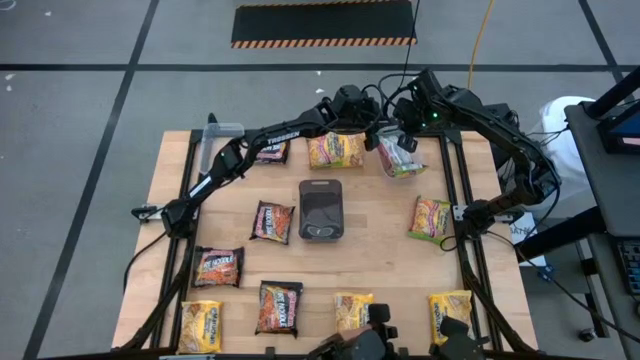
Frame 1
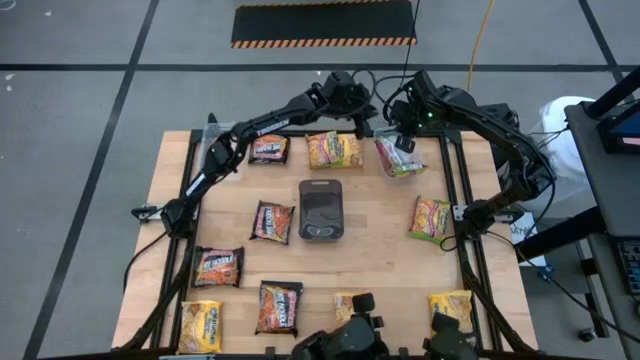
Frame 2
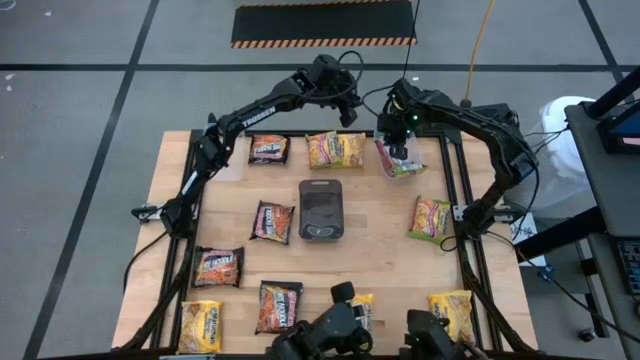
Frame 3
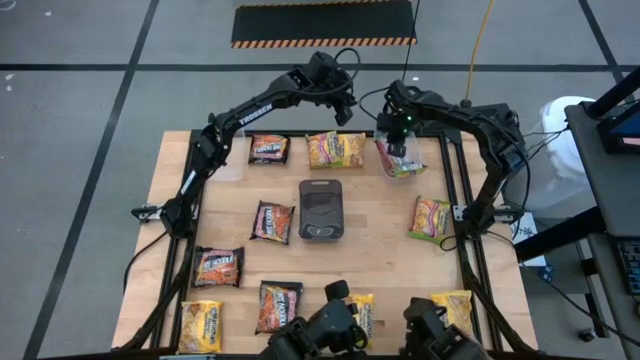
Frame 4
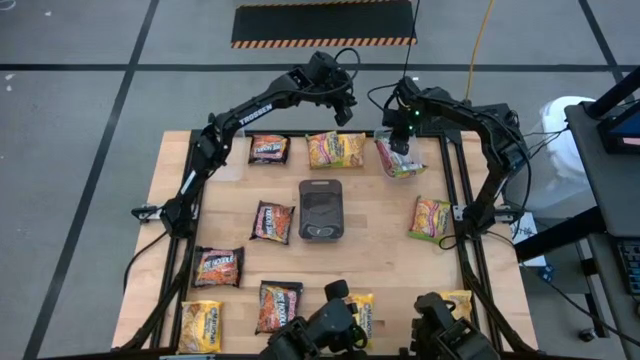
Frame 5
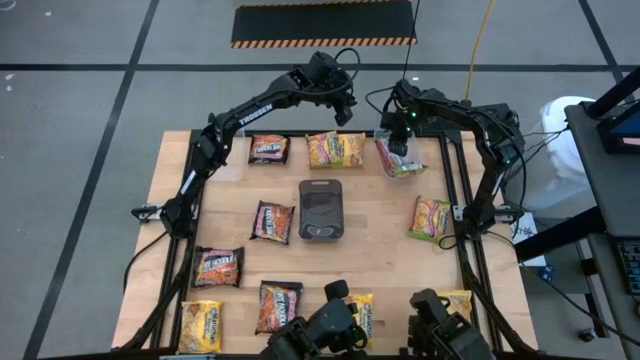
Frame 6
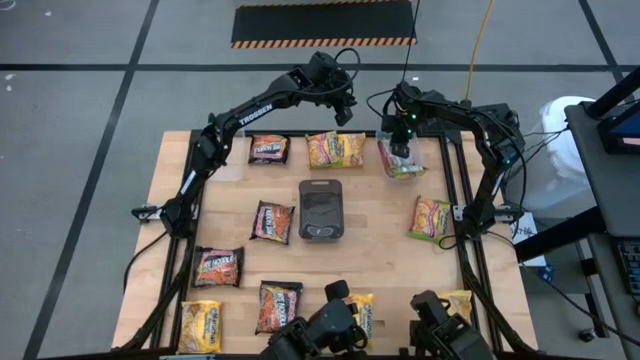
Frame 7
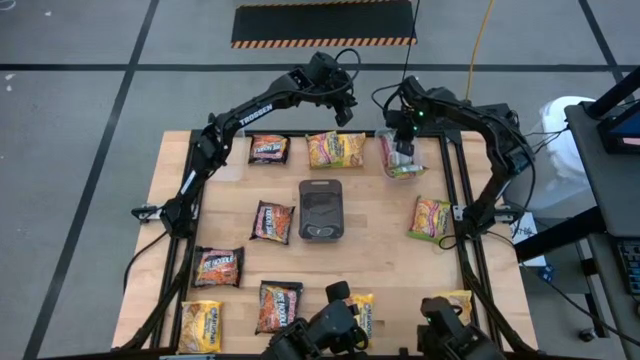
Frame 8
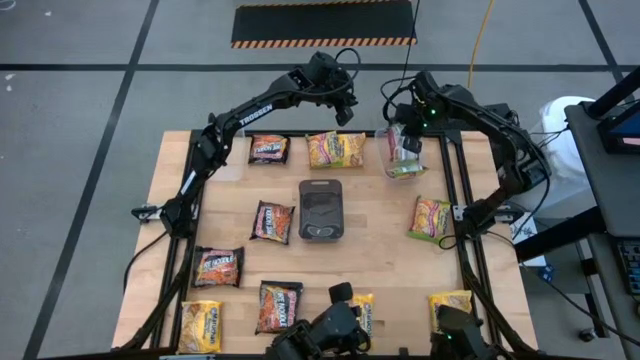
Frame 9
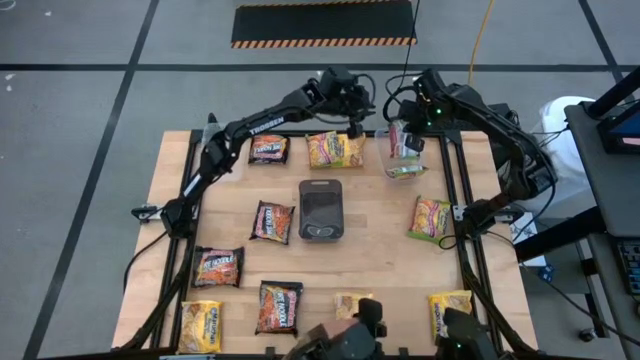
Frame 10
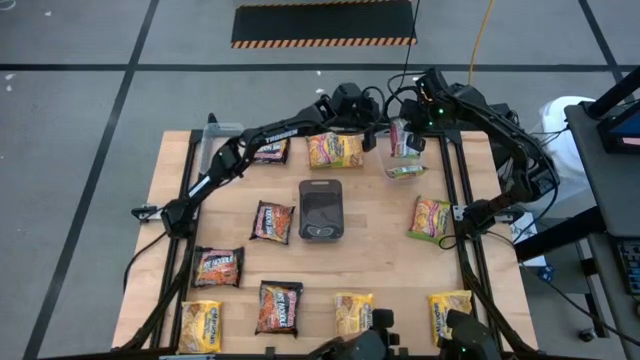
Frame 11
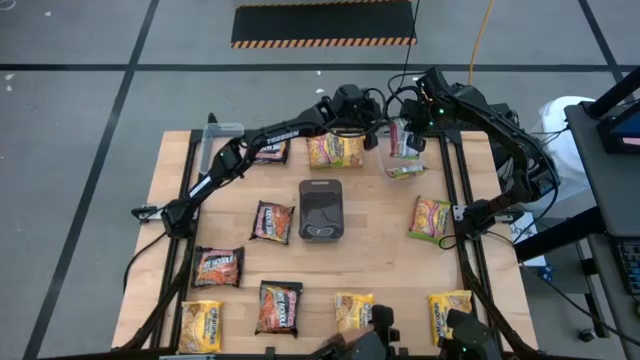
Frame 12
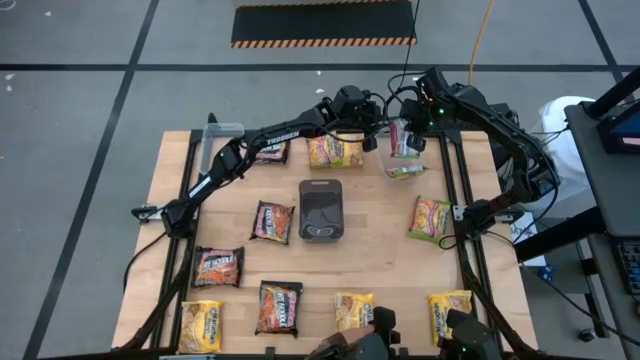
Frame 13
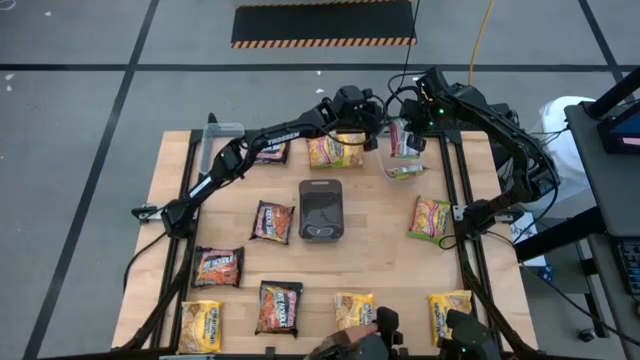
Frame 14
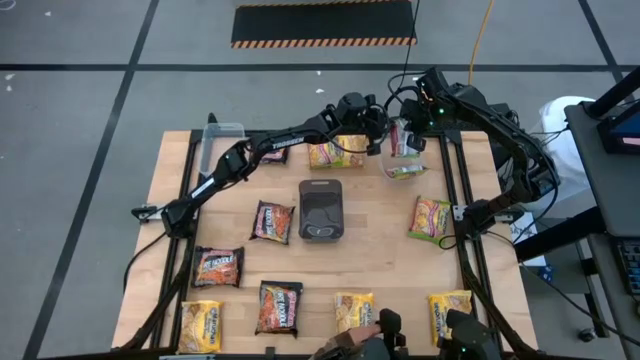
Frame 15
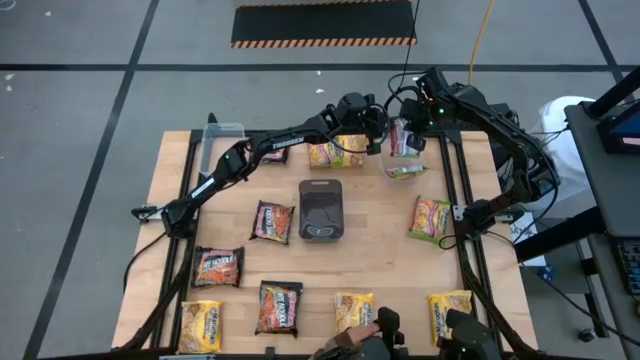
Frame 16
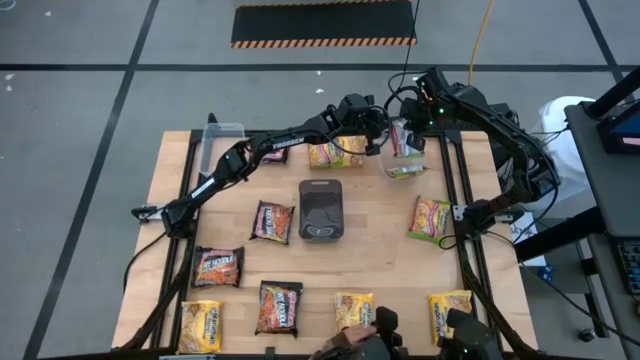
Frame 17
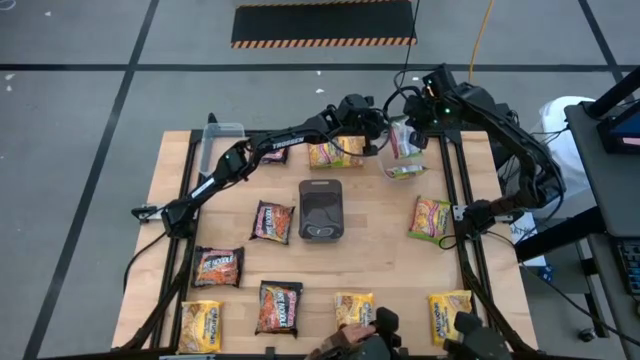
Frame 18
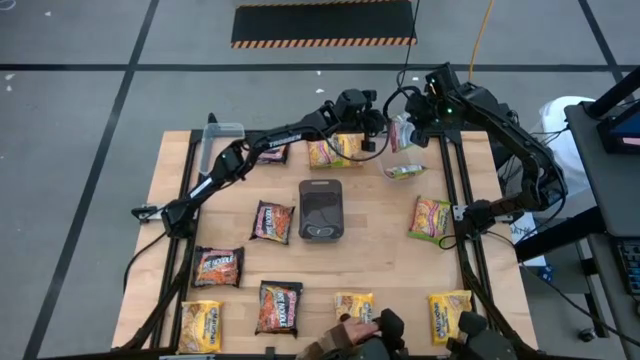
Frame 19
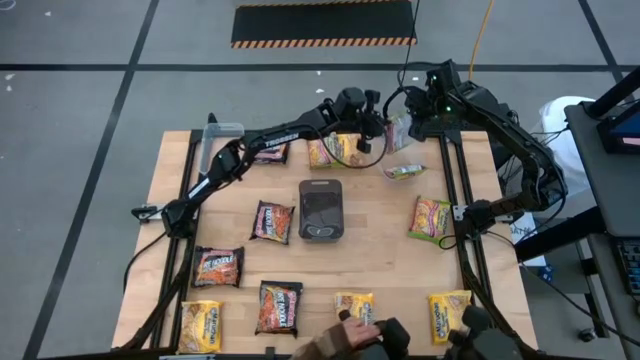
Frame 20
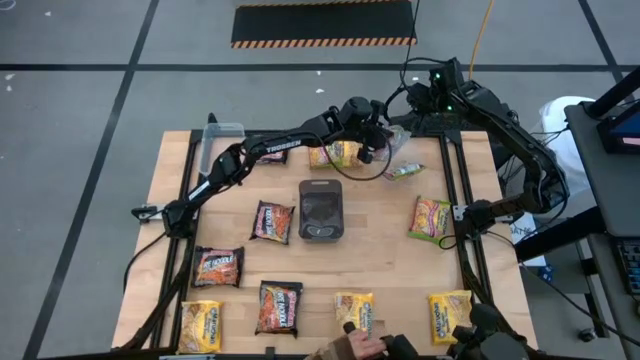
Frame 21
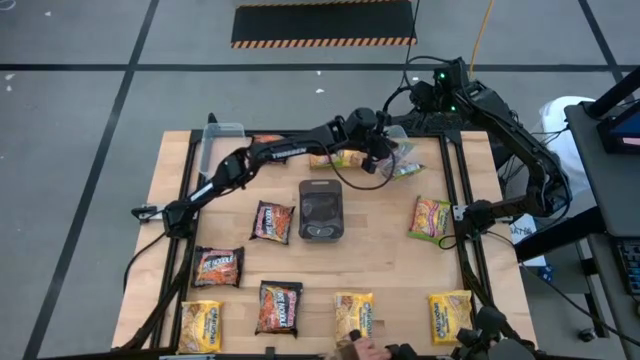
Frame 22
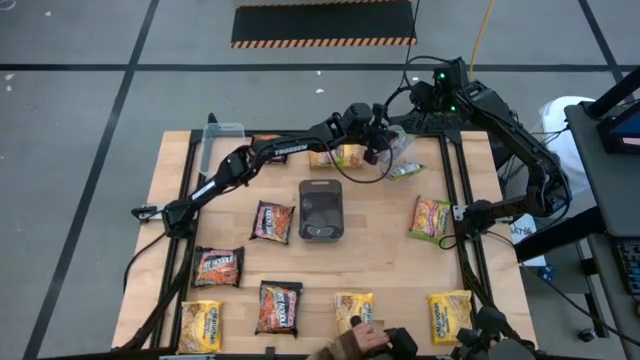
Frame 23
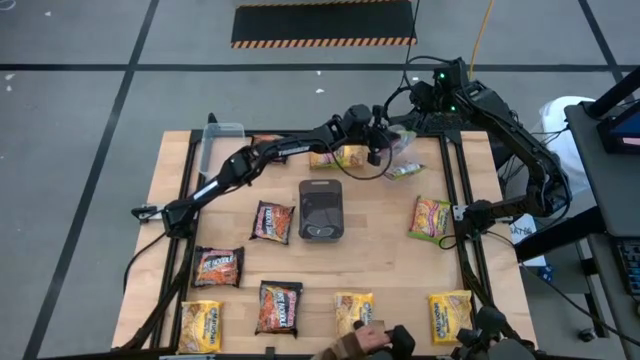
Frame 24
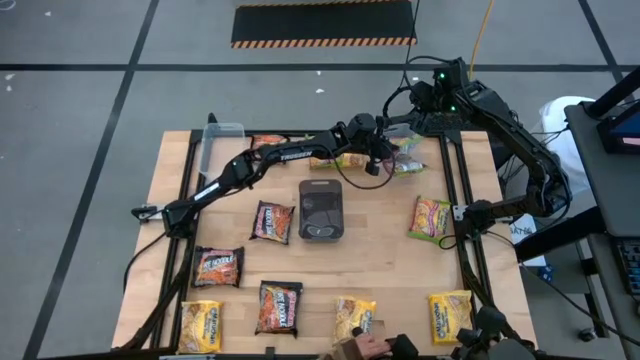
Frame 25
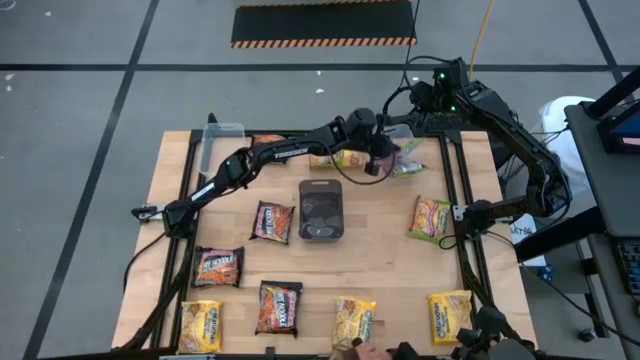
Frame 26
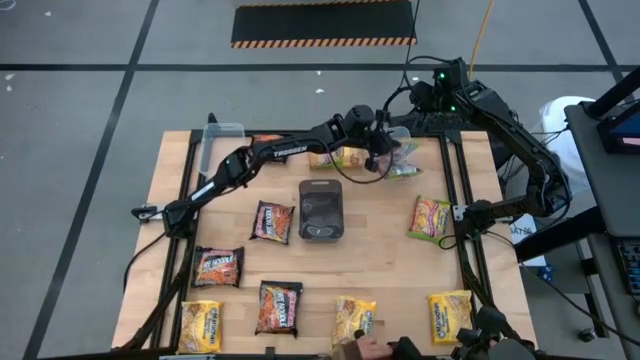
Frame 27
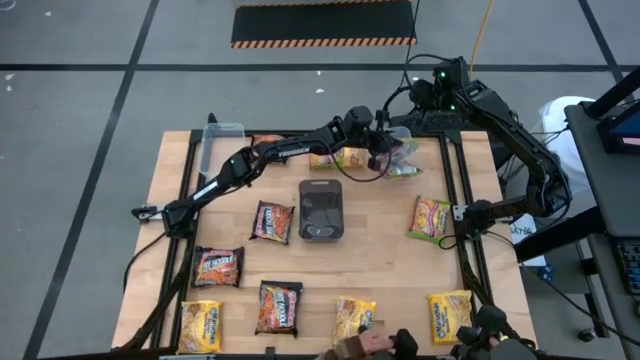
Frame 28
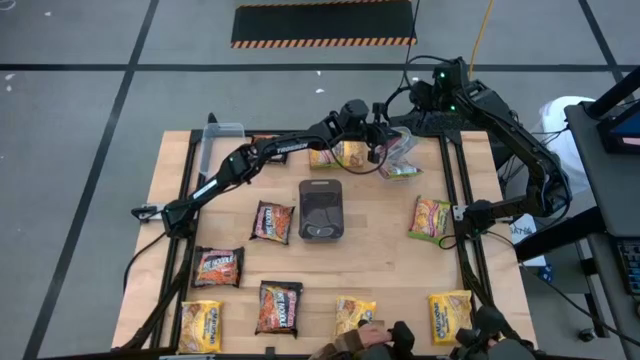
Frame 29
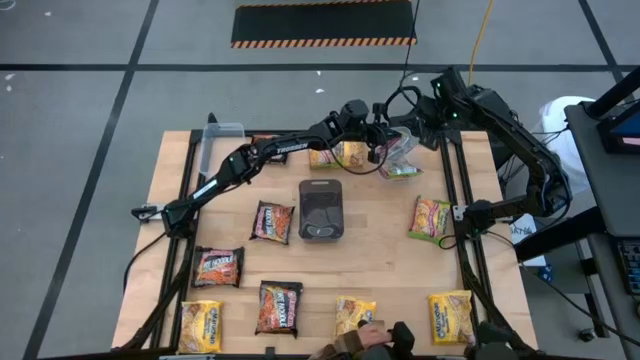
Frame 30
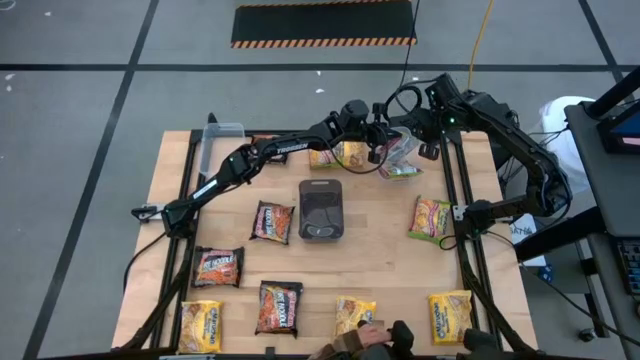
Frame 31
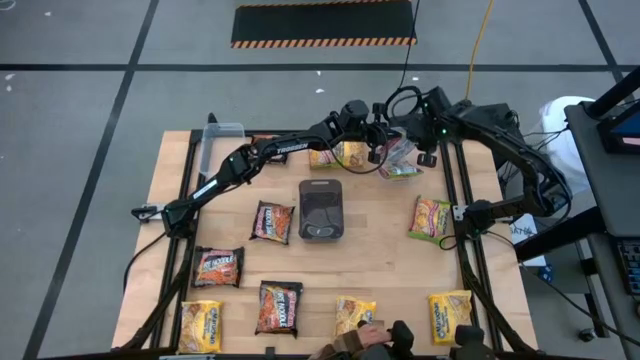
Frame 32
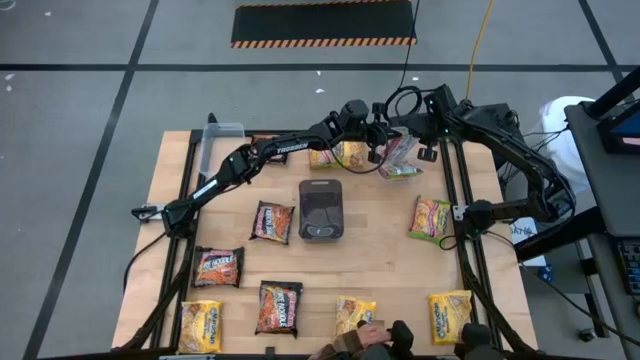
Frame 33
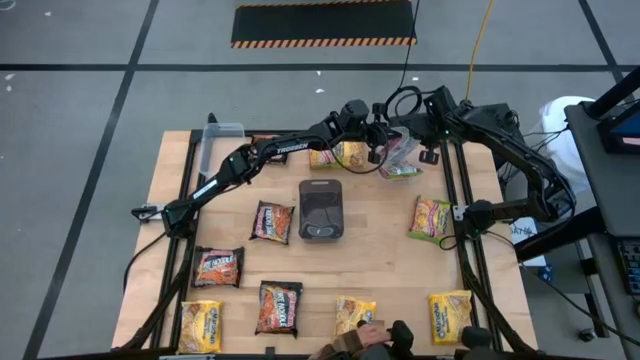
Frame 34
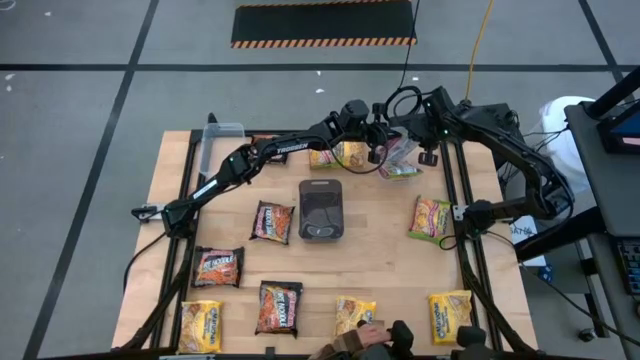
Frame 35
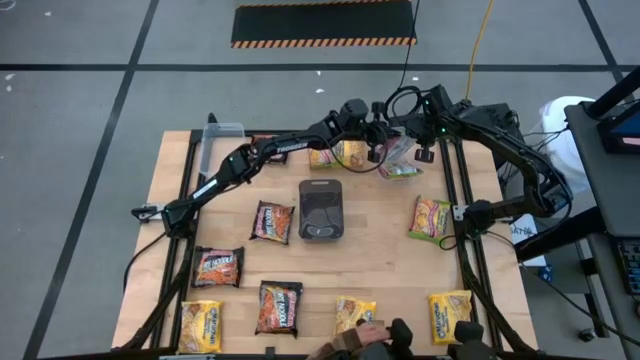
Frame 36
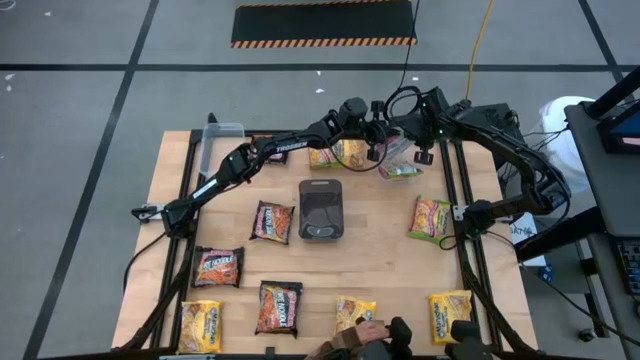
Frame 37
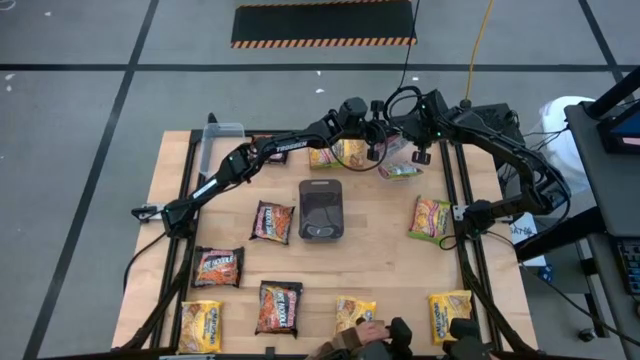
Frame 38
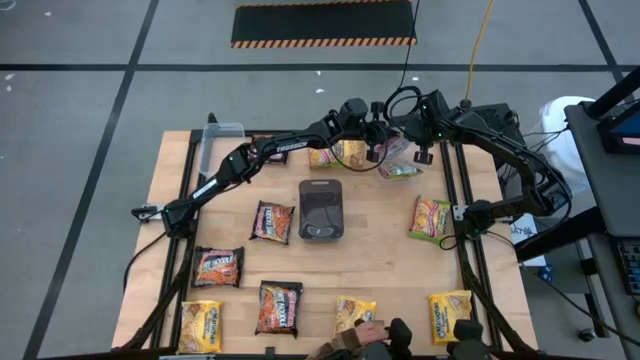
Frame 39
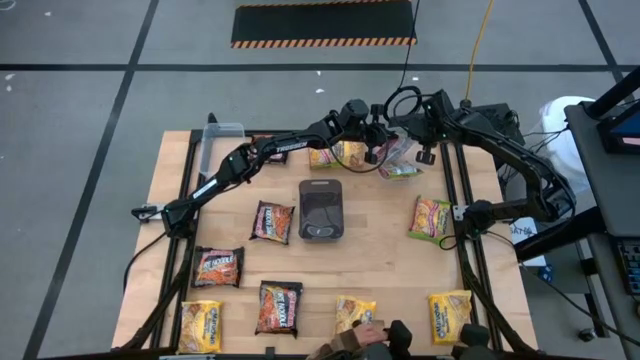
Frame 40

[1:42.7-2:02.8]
Task: Sort Maruchan noodles
Adjust the green noodle pack
